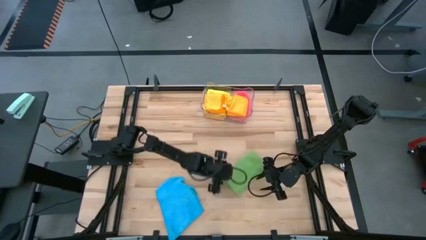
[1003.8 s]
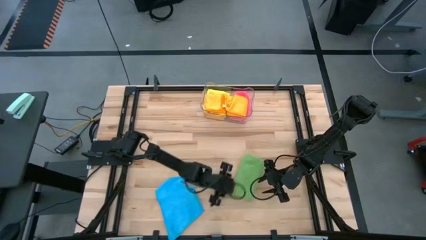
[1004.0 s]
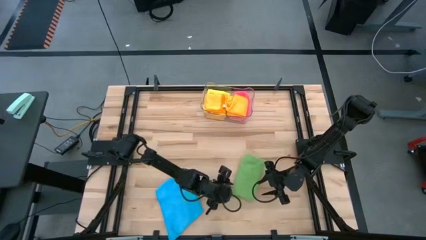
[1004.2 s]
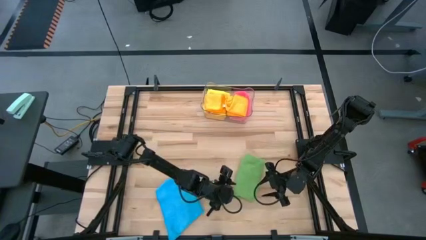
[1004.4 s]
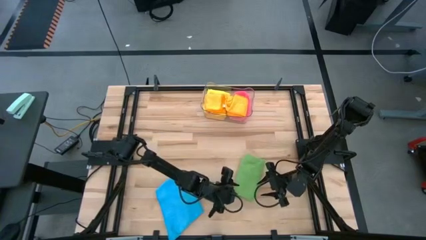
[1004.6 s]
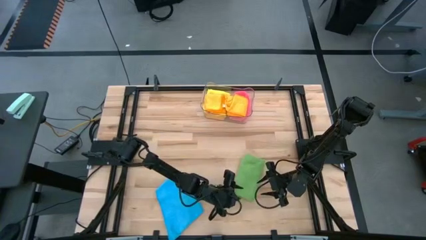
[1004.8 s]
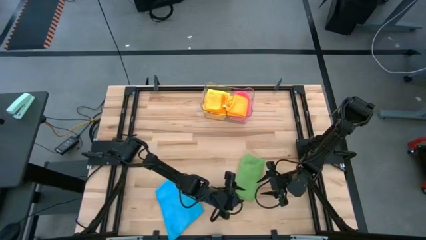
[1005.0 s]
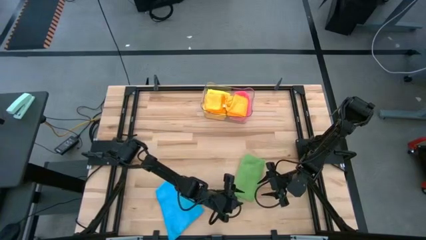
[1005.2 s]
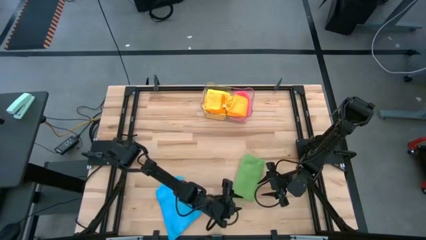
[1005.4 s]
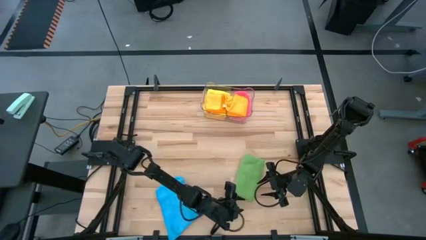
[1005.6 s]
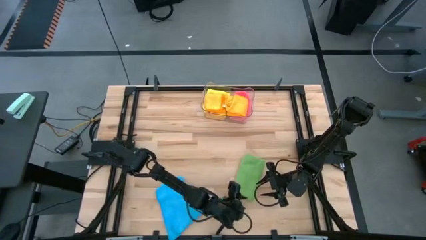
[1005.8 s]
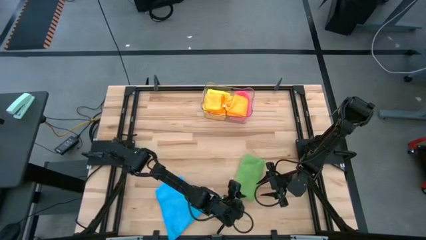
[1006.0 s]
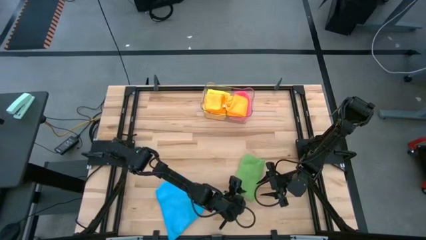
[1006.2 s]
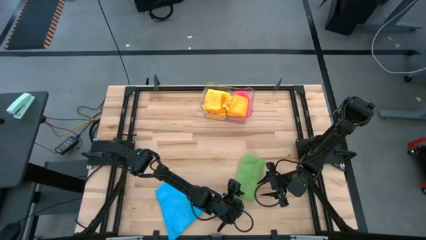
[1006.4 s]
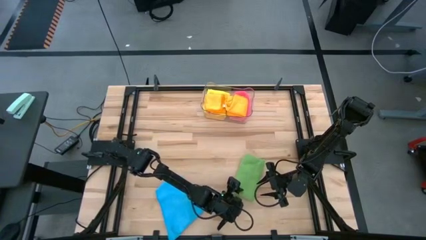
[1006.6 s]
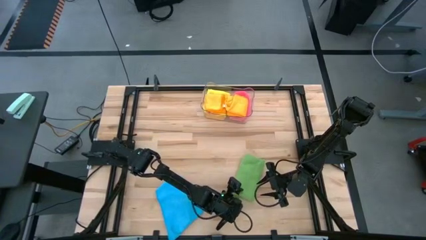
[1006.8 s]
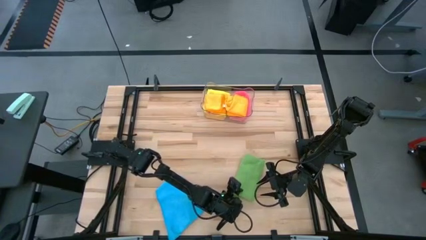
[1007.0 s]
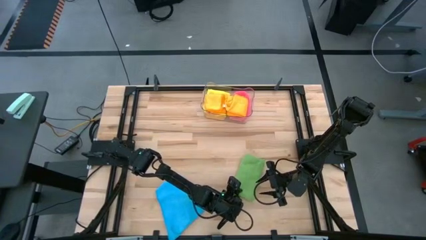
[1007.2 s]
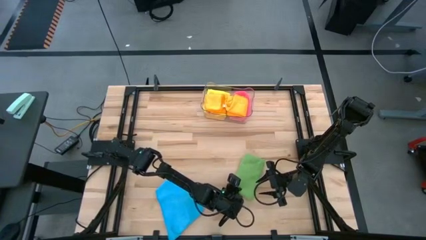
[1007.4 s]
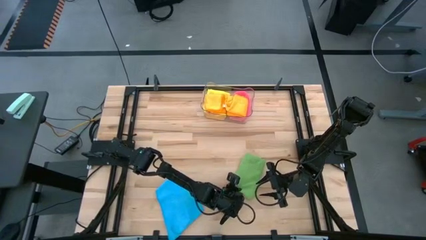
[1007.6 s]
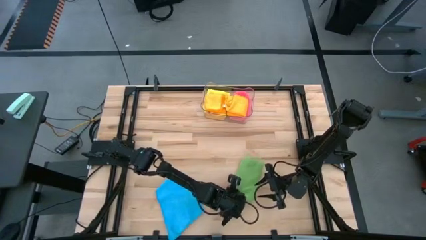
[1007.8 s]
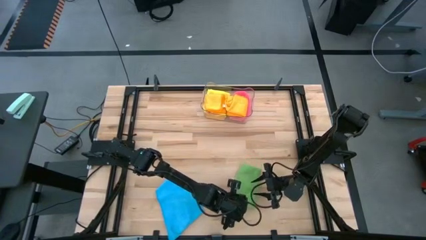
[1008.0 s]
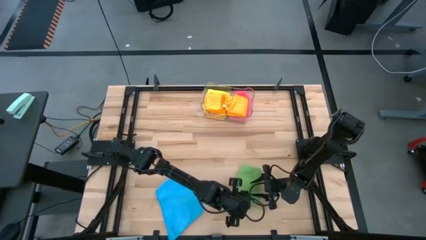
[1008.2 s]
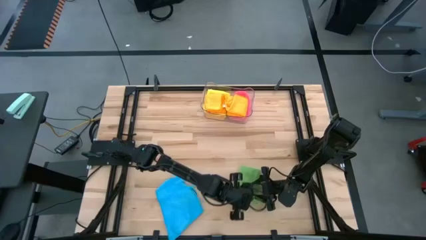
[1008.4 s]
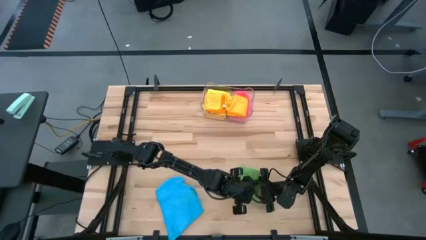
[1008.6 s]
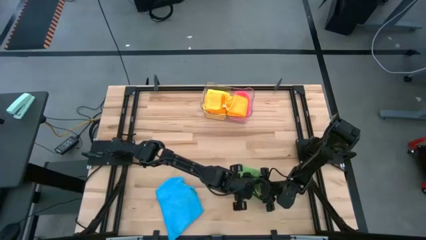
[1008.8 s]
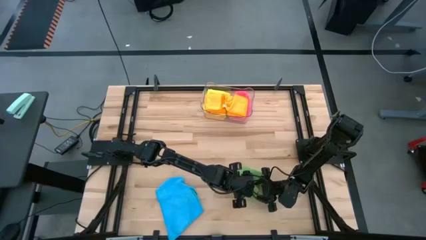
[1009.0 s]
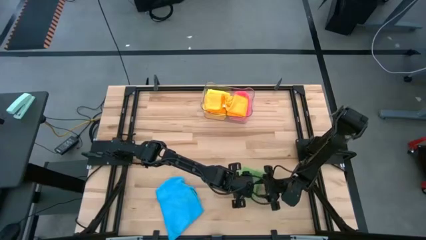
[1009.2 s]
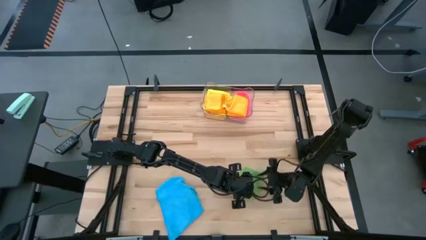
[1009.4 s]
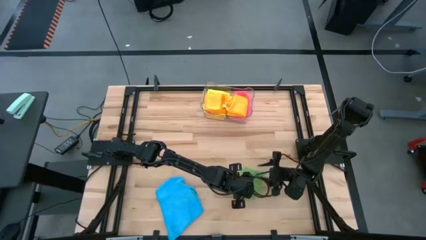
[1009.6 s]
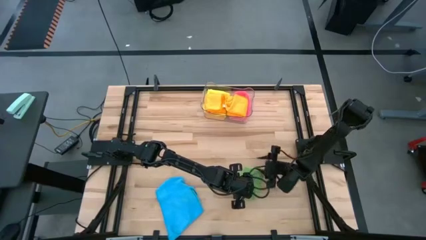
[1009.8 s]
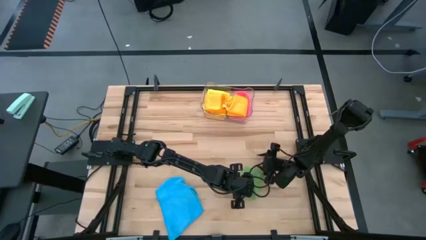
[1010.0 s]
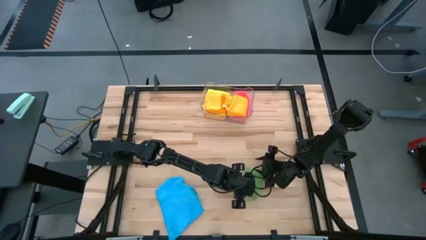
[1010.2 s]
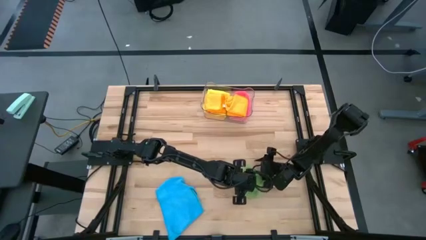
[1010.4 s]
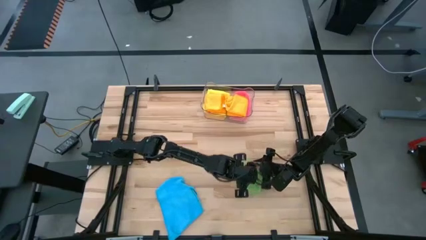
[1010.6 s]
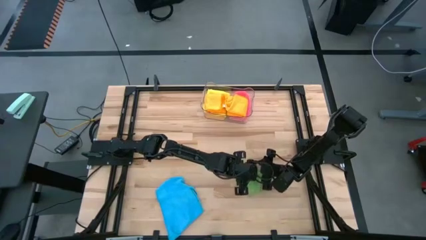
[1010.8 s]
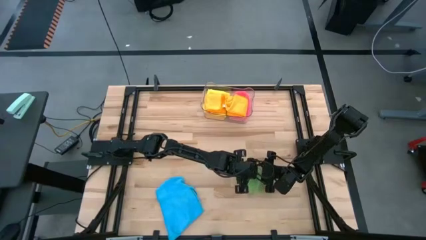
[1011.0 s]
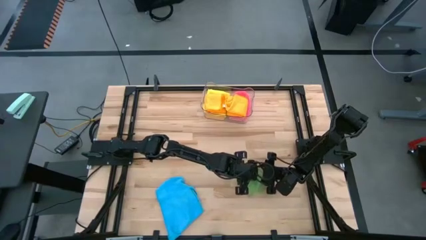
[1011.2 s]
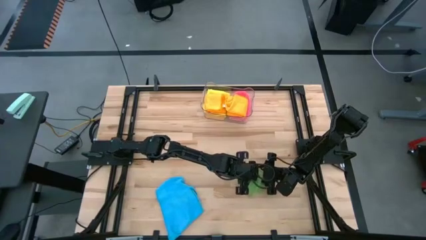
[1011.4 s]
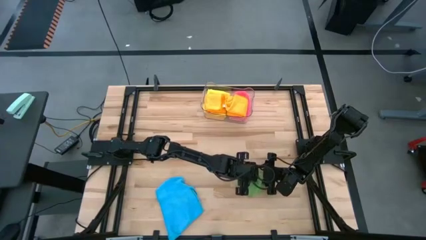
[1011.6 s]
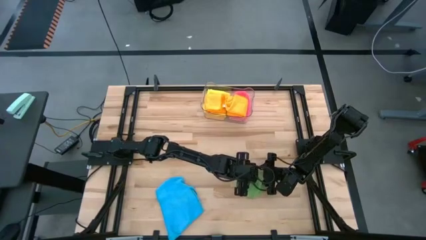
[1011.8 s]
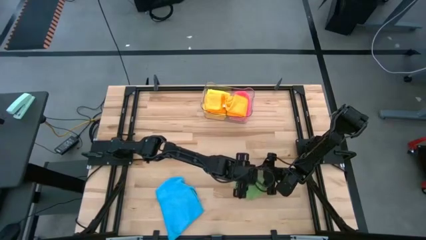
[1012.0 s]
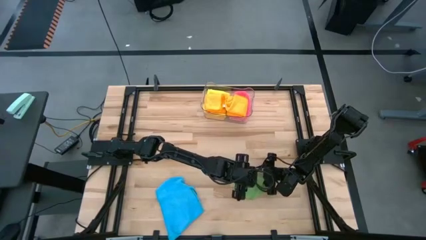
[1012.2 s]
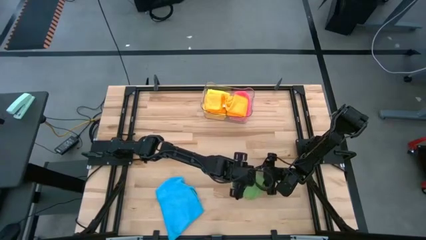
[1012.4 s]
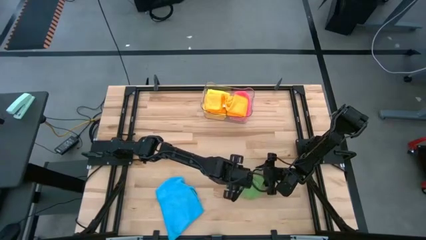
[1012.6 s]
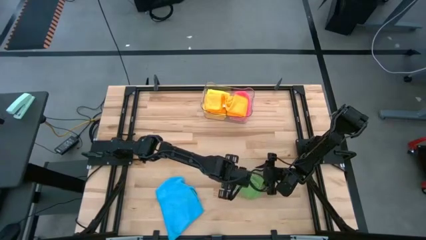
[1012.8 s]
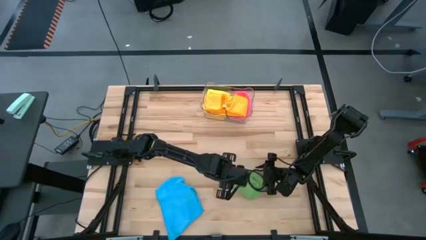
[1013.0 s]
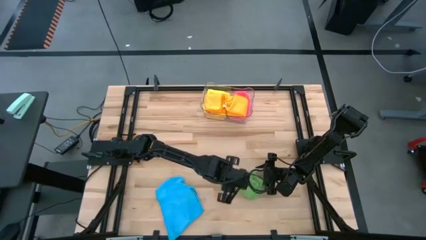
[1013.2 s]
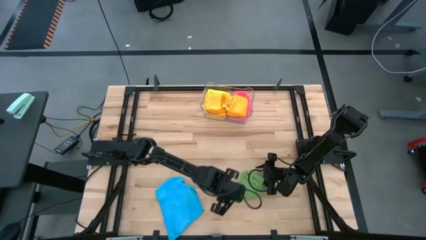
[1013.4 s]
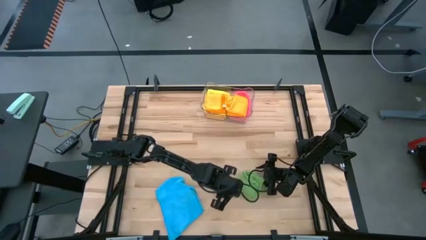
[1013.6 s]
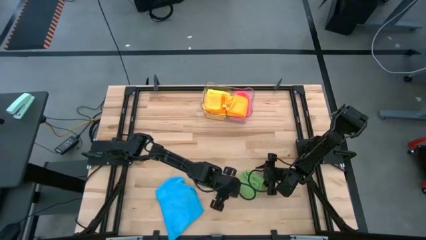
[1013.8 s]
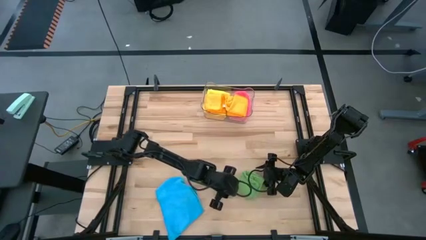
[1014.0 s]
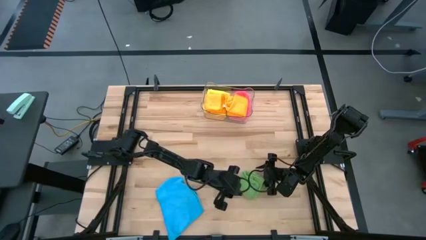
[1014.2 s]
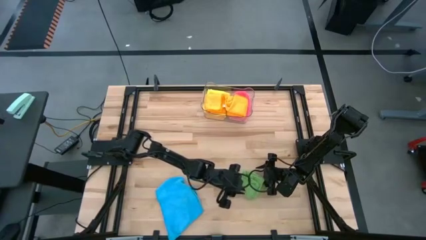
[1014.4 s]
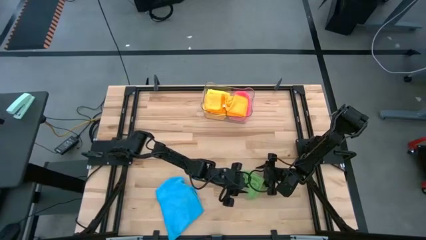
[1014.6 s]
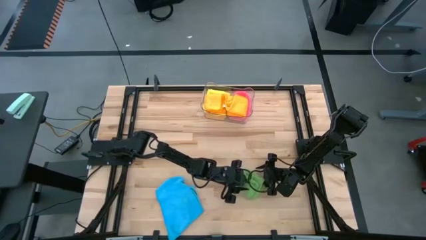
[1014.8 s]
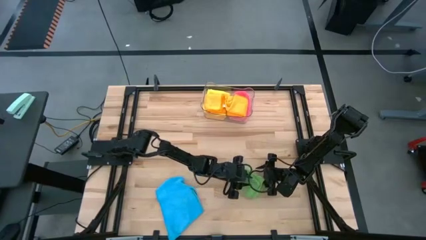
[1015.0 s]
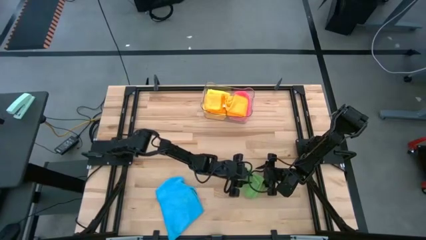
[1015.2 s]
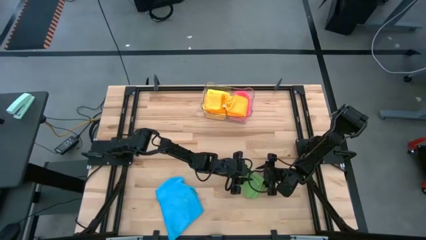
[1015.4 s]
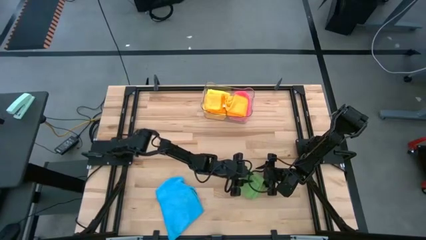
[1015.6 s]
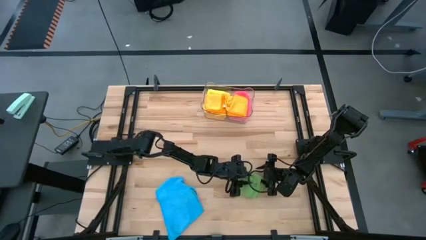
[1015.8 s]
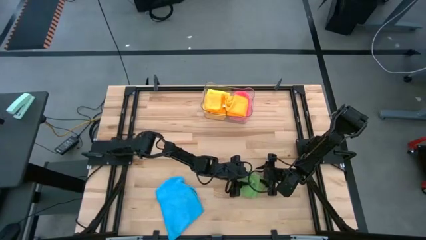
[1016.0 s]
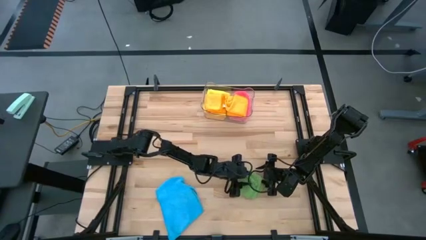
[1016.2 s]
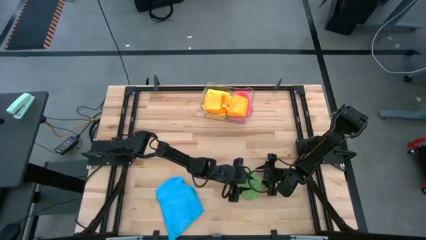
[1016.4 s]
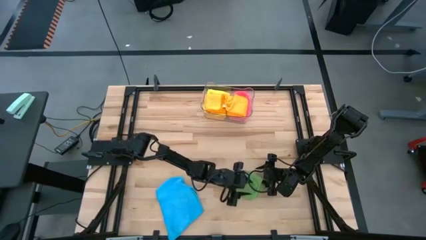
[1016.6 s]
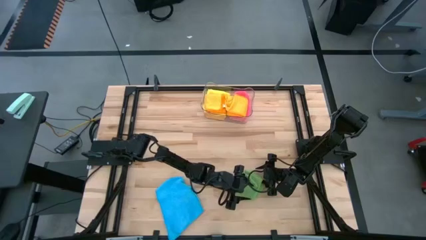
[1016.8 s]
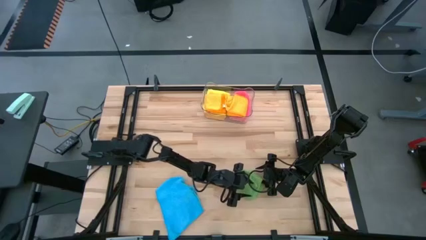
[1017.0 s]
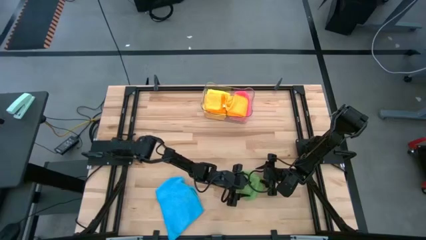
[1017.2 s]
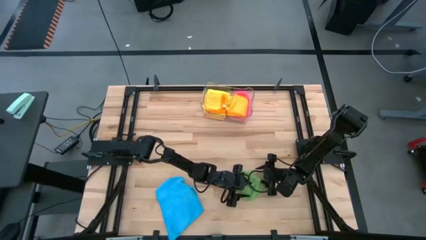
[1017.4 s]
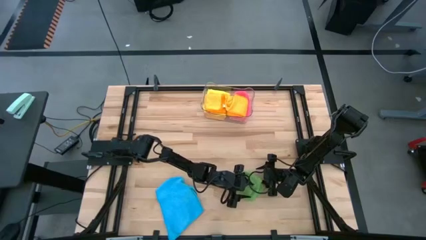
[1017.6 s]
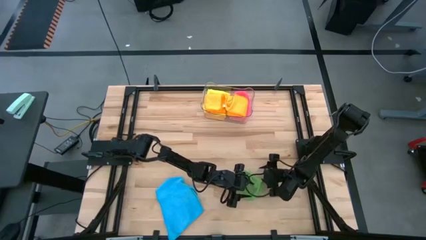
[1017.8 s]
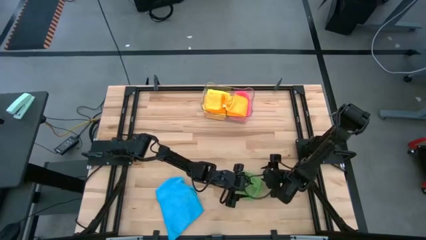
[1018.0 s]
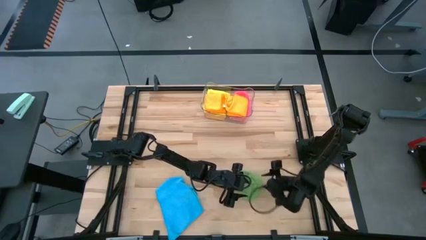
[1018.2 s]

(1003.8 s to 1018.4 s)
Task: Fold microfiber towels
Fold the green microfiber cloth
